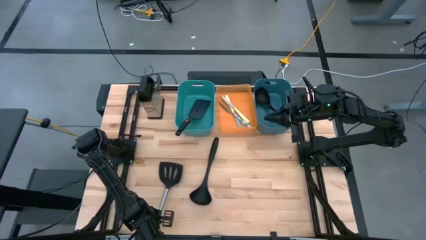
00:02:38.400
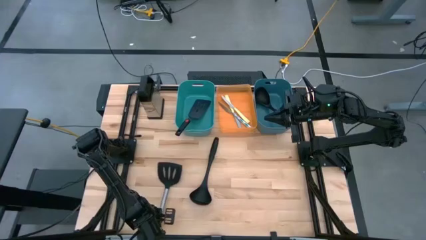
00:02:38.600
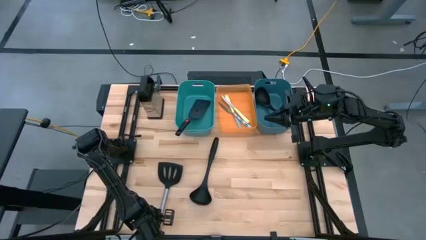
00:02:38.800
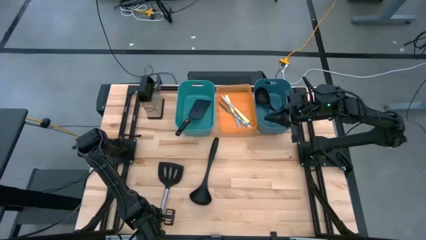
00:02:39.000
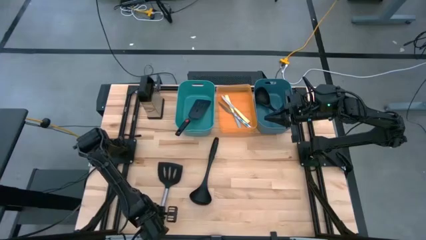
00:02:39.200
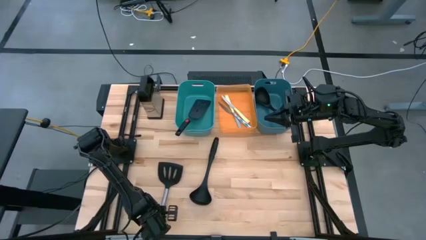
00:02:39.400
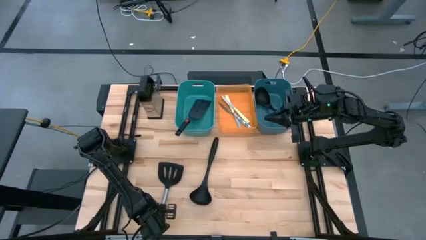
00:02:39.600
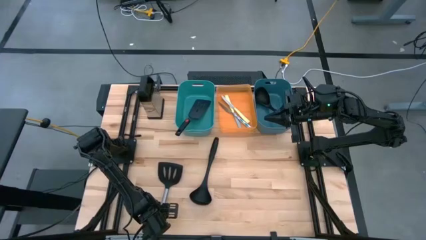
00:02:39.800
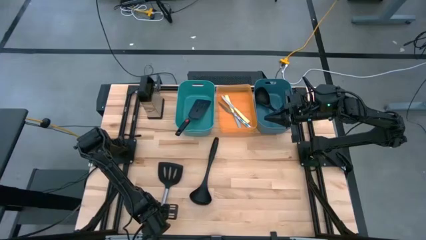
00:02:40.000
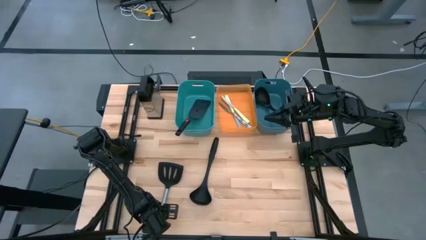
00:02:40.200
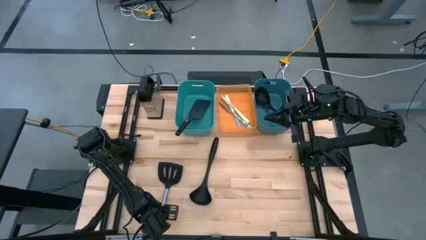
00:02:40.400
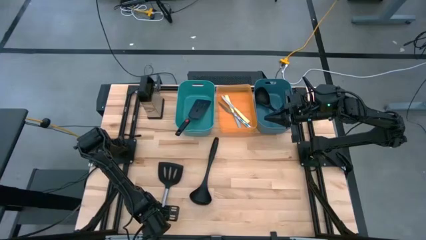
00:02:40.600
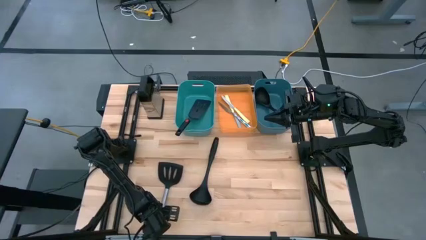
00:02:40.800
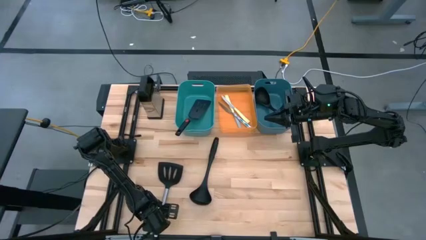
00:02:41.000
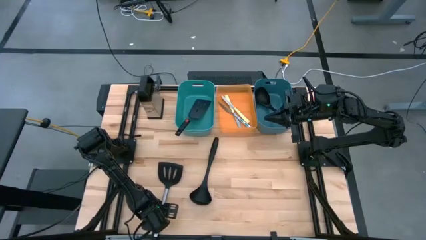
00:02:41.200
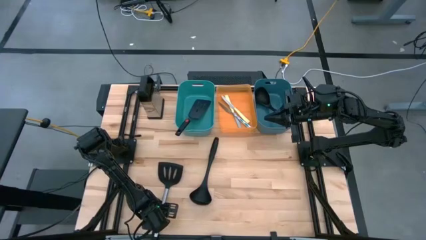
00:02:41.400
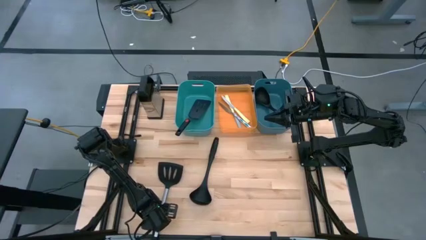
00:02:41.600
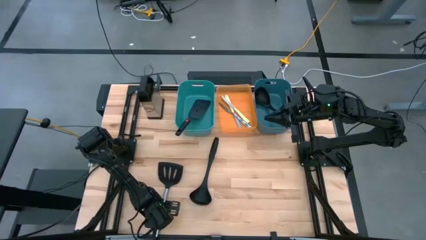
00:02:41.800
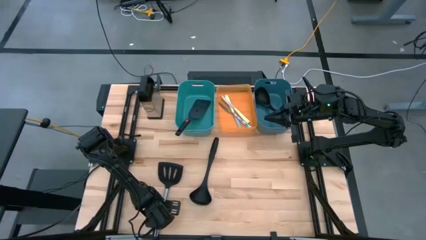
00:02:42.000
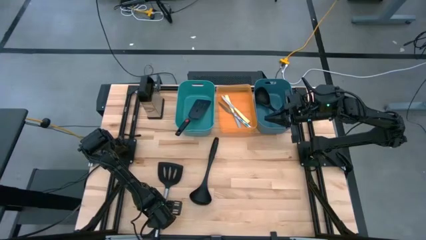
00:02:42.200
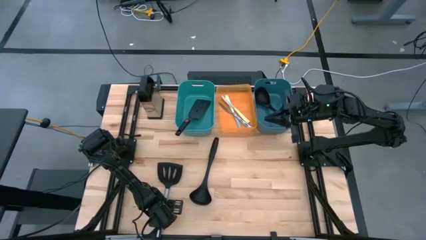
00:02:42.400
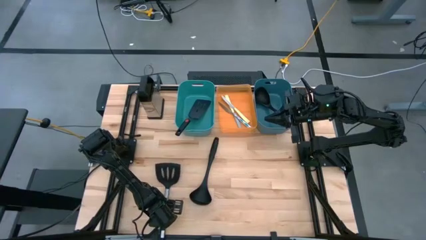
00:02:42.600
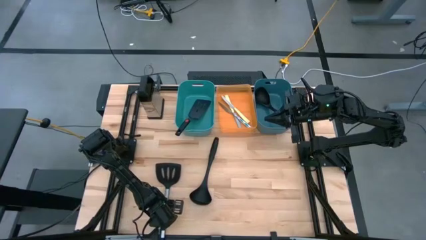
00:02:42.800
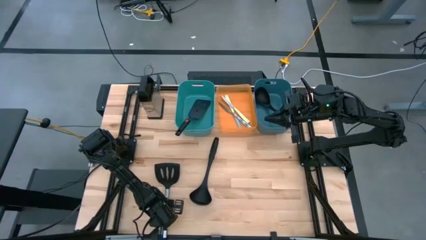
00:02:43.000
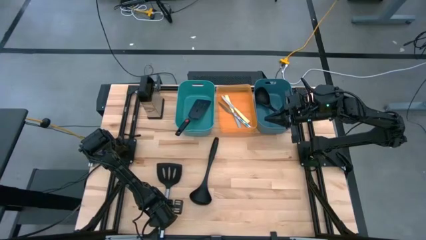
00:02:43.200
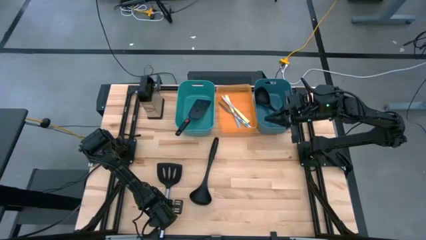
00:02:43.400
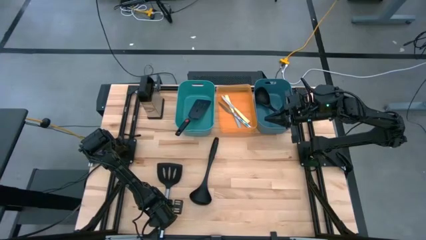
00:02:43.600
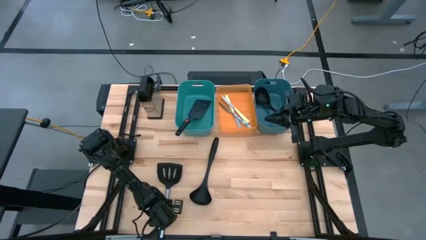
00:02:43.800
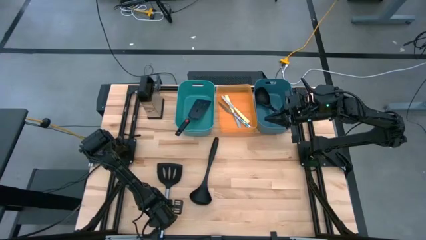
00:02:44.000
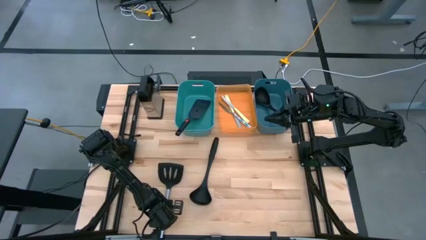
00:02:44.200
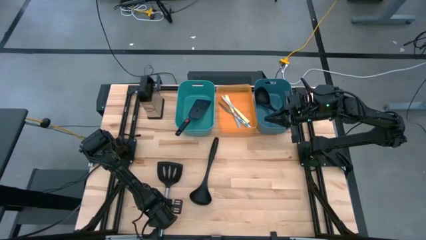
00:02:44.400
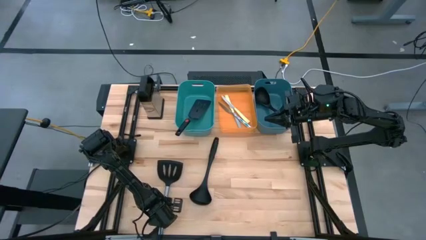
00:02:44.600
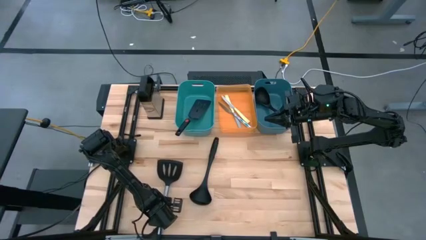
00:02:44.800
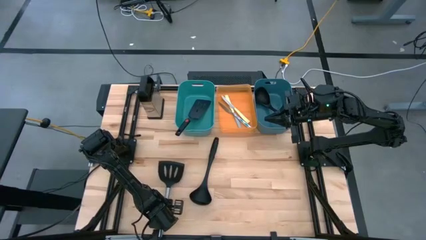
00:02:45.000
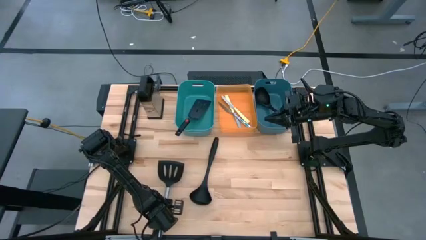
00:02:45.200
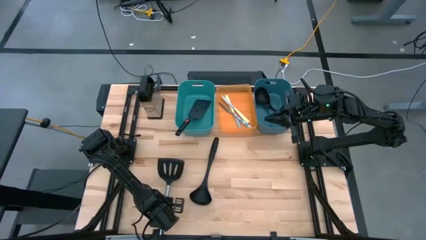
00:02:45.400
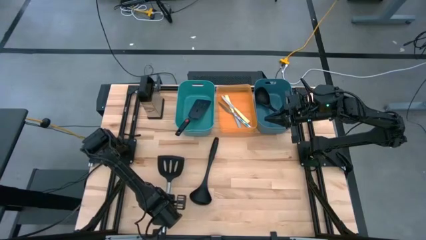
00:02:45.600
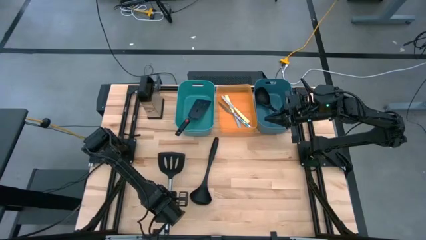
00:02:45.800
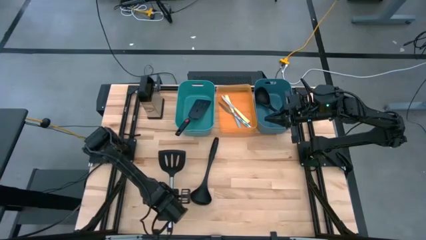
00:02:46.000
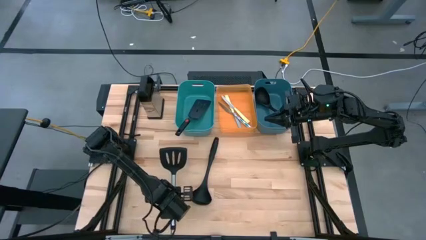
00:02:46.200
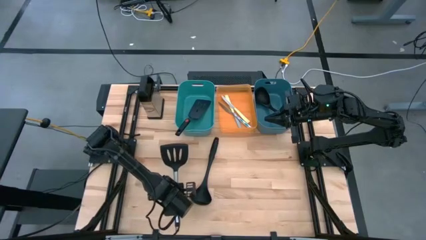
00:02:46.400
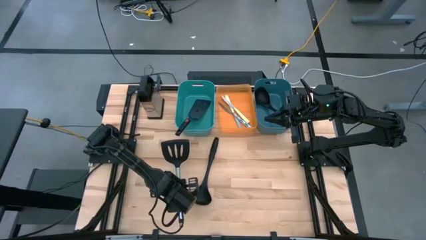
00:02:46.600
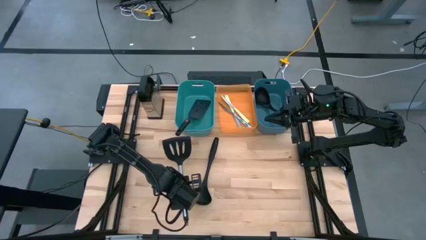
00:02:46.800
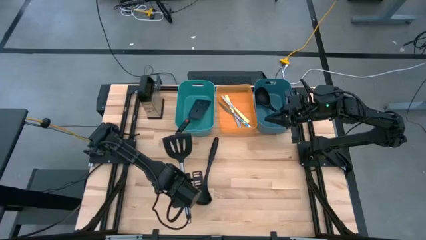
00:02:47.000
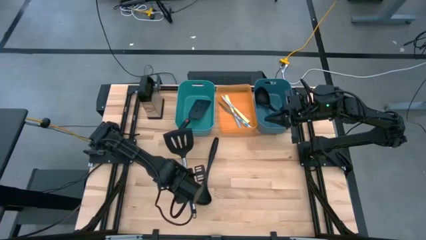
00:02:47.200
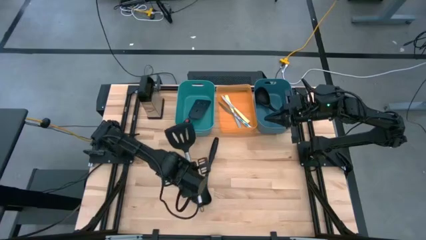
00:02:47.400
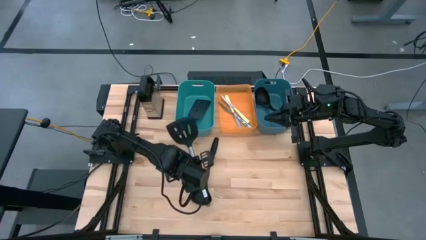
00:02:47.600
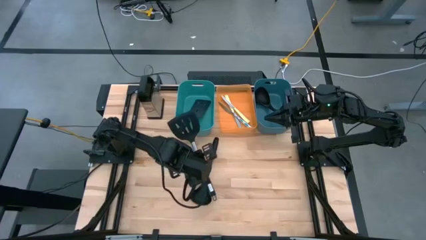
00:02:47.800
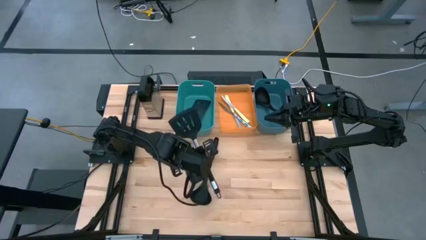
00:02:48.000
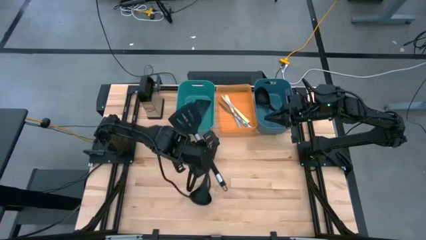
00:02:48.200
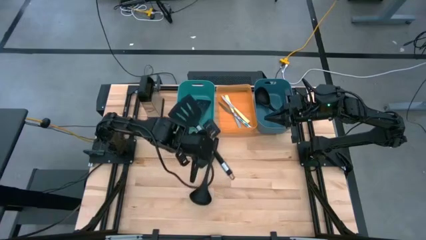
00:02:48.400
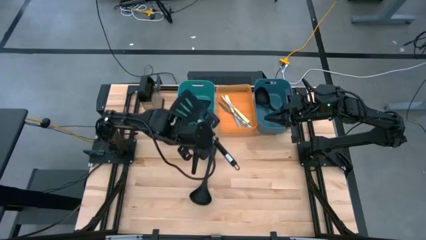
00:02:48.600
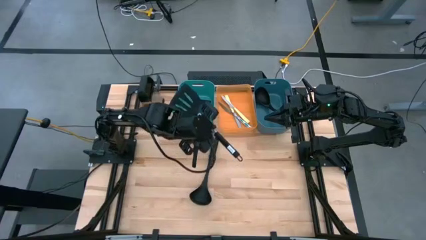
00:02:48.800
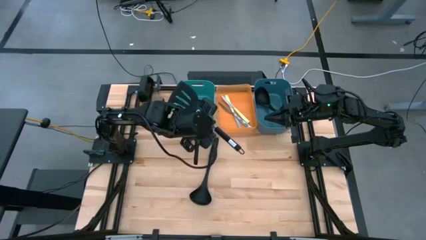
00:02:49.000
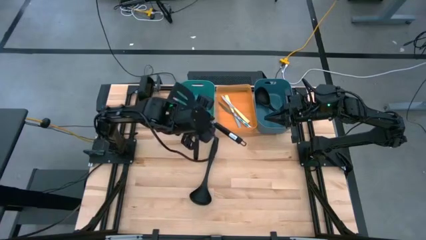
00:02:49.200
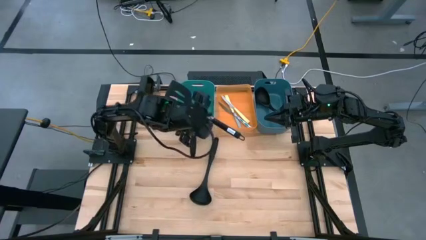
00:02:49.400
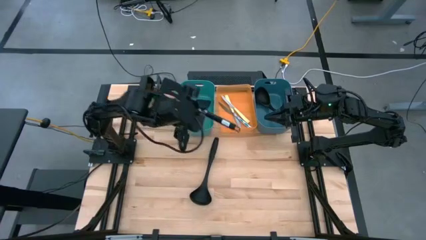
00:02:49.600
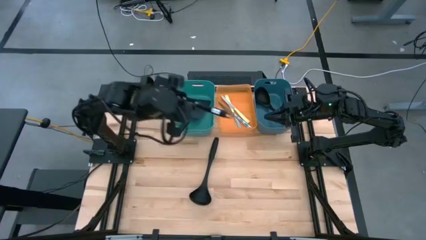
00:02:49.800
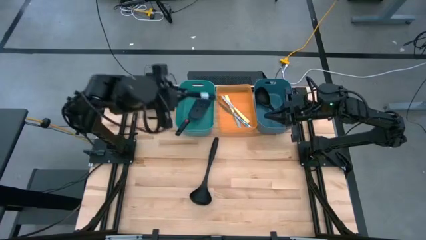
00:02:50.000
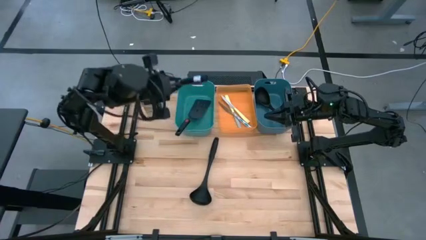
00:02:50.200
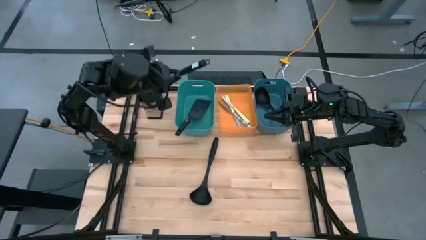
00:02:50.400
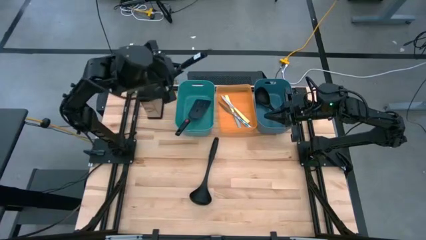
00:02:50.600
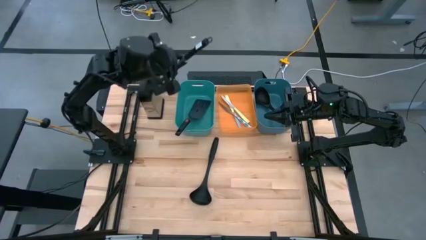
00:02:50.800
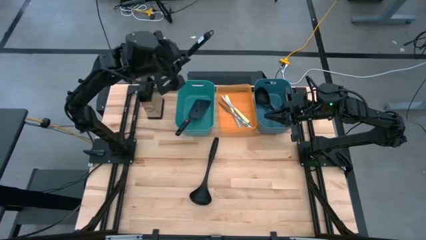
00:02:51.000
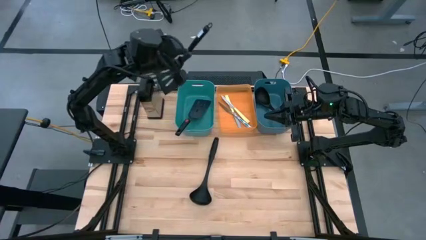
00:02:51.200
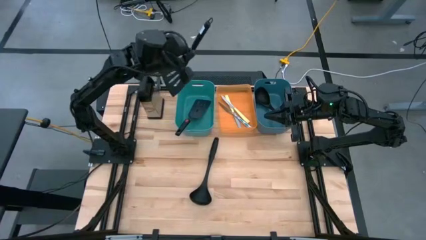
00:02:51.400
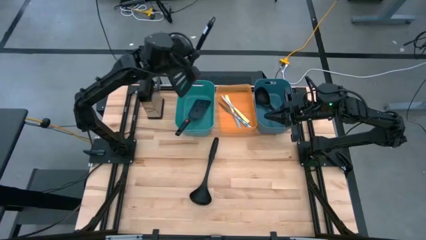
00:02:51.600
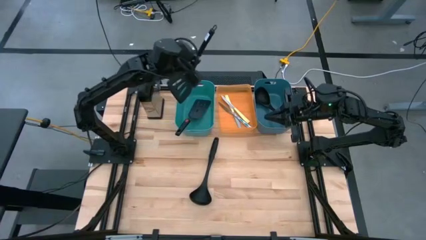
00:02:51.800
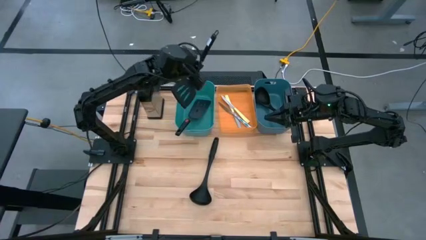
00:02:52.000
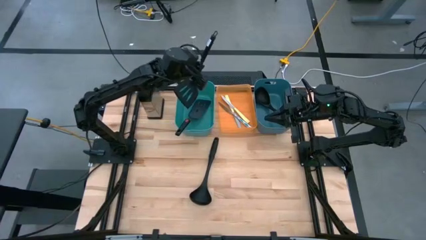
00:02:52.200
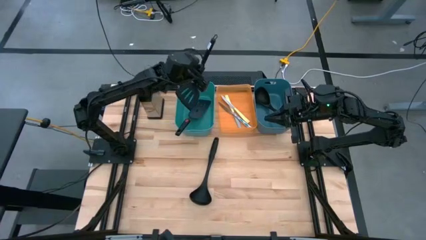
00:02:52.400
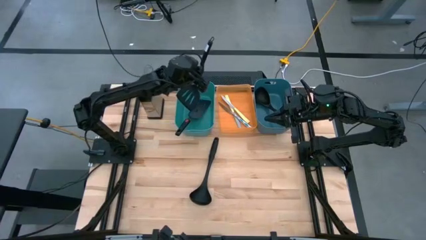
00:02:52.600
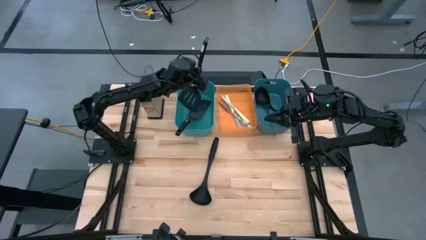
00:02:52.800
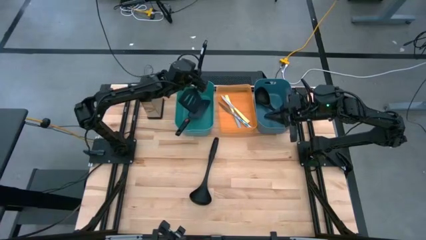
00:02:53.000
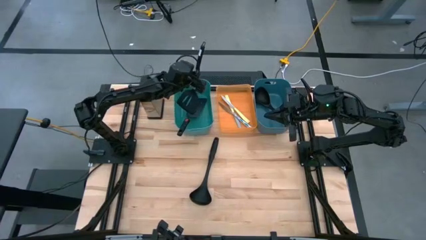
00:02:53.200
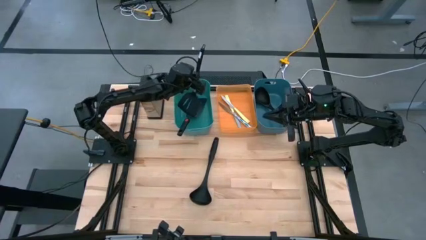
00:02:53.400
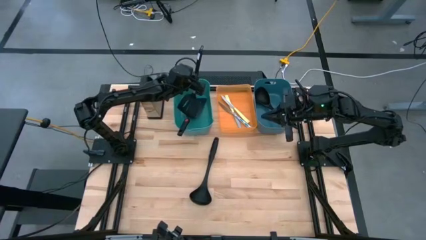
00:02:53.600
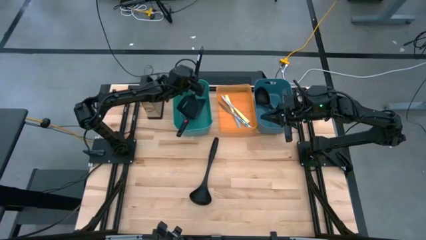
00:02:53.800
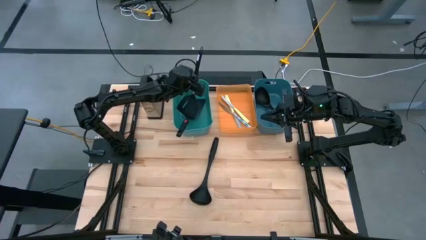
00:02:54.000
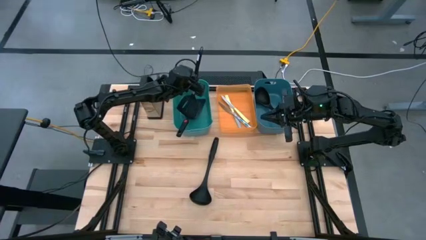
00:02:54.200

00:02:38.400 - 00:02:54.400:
Task: Pick & Place Kitchen Items
Put the black spatula into the green bin
